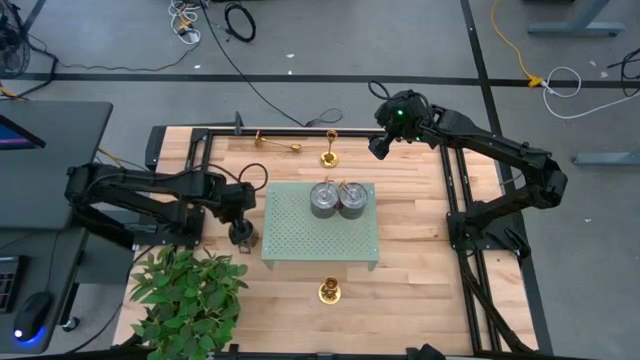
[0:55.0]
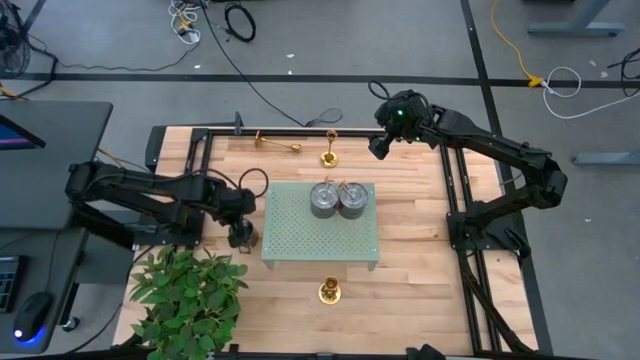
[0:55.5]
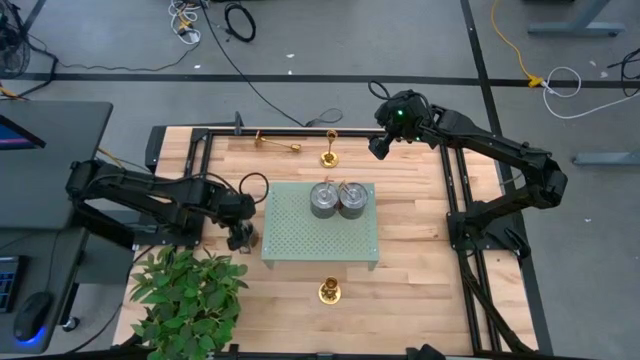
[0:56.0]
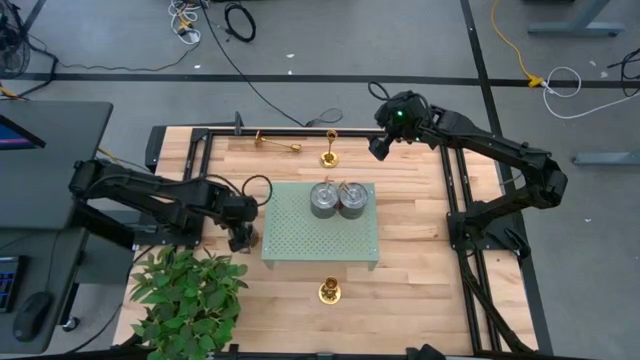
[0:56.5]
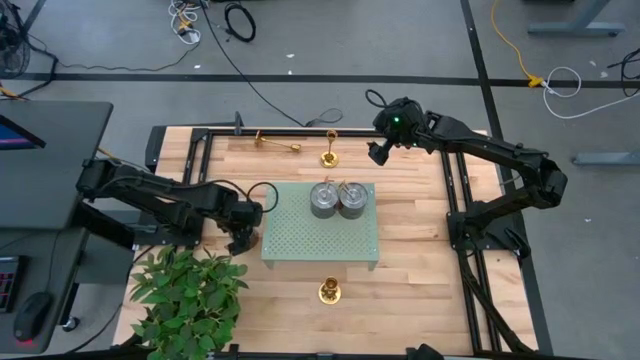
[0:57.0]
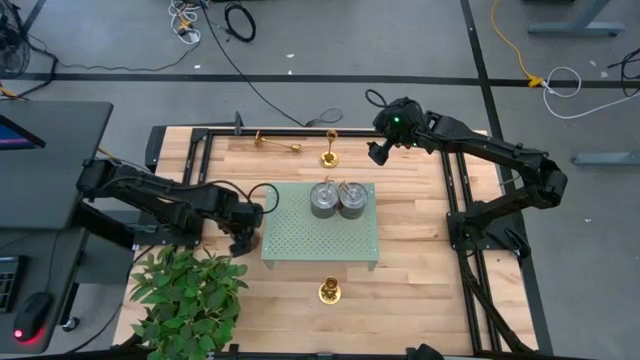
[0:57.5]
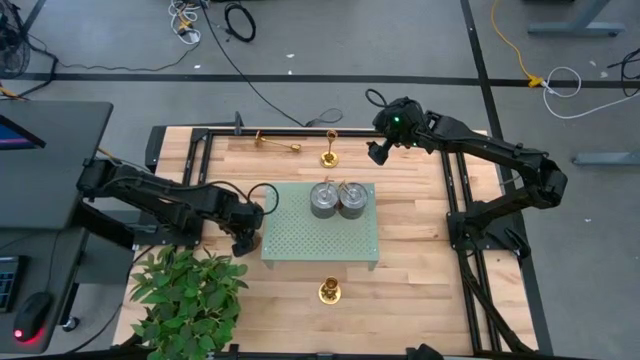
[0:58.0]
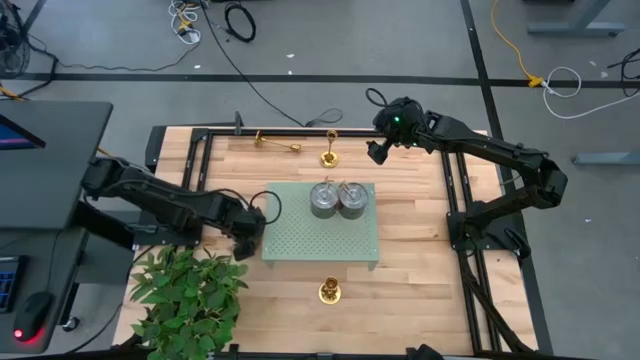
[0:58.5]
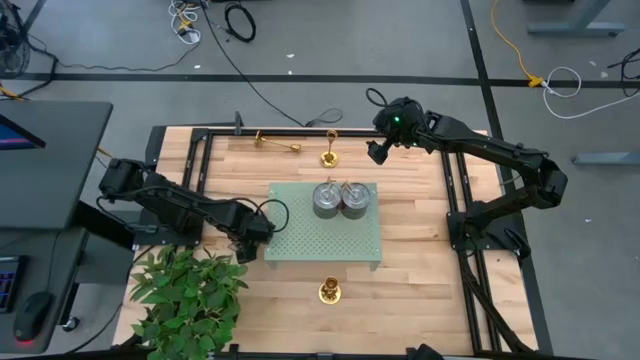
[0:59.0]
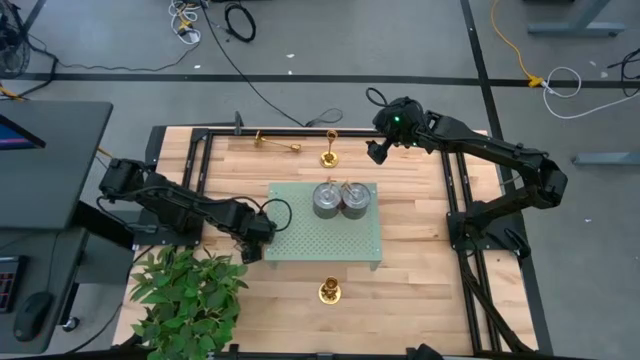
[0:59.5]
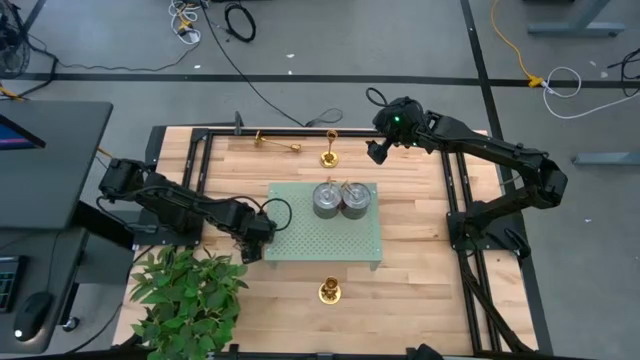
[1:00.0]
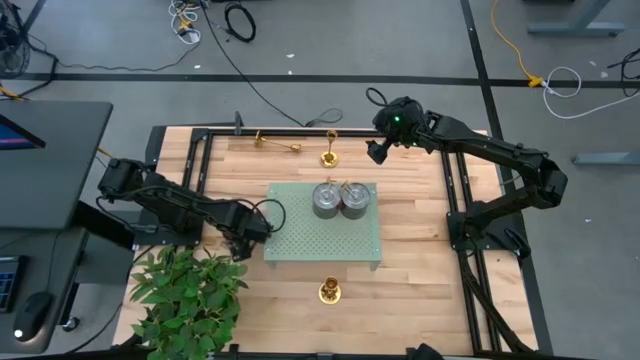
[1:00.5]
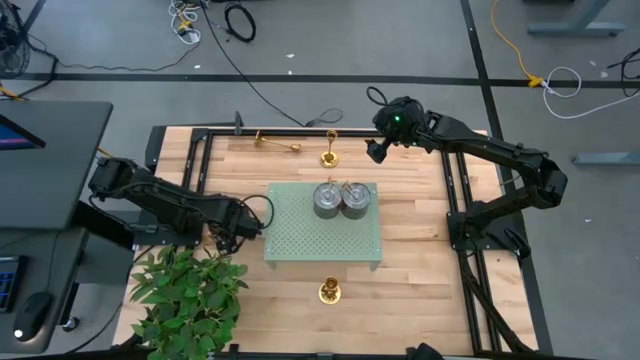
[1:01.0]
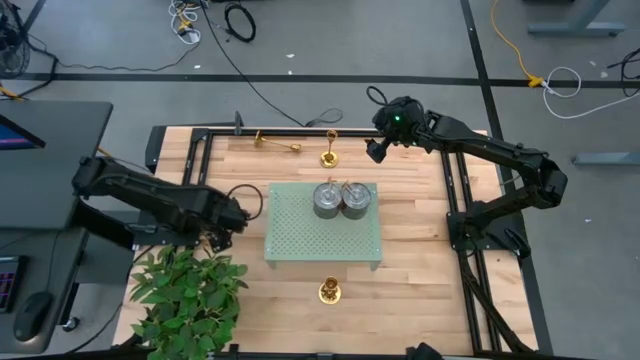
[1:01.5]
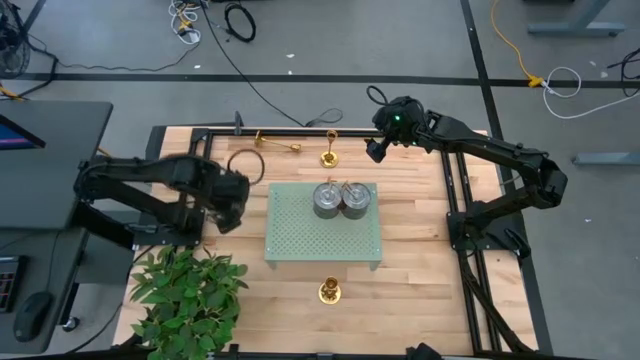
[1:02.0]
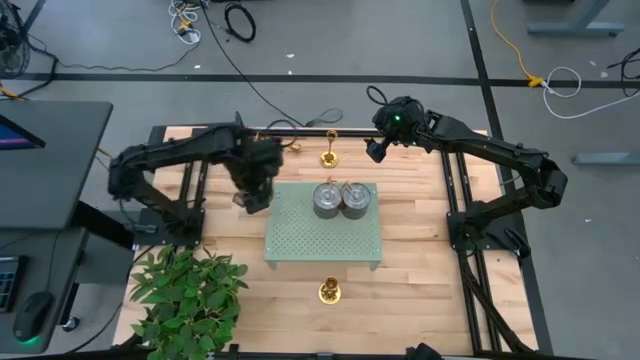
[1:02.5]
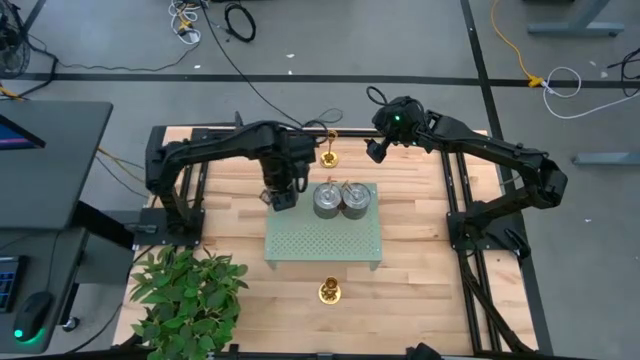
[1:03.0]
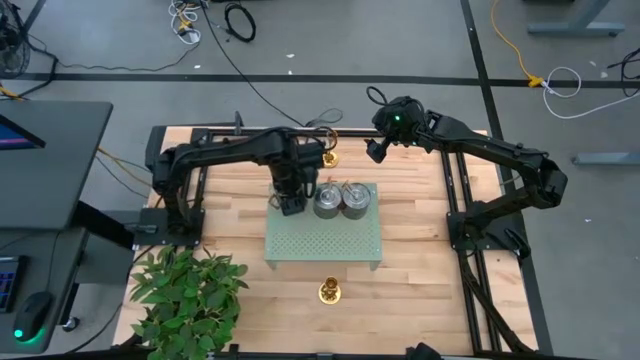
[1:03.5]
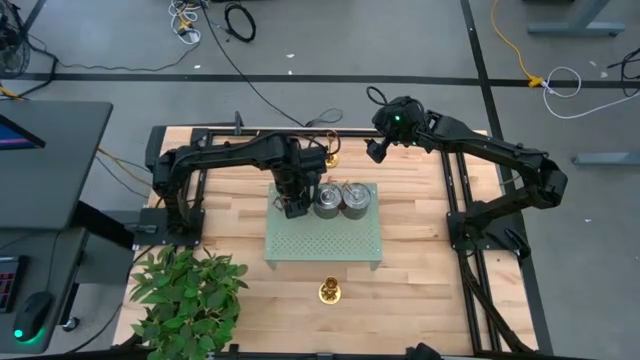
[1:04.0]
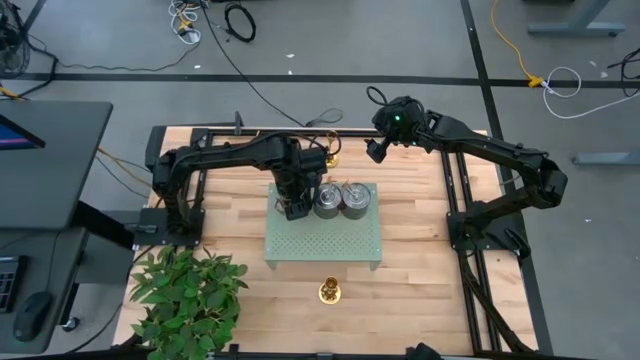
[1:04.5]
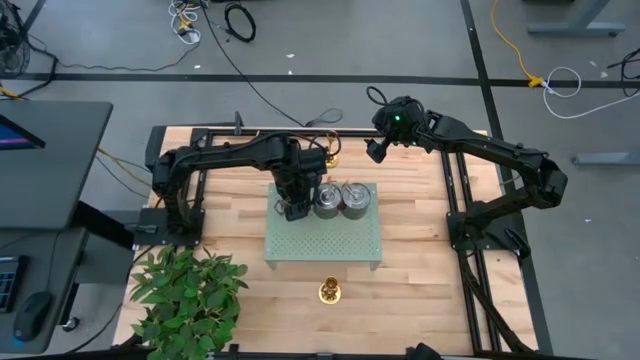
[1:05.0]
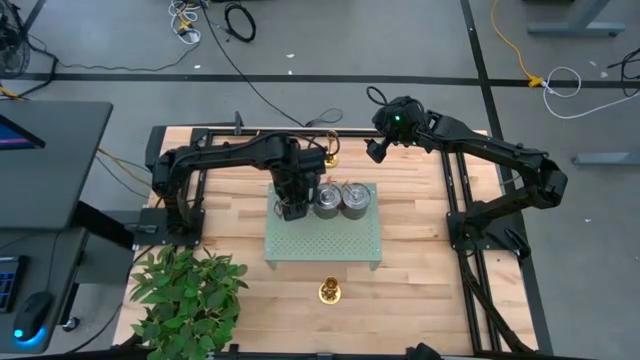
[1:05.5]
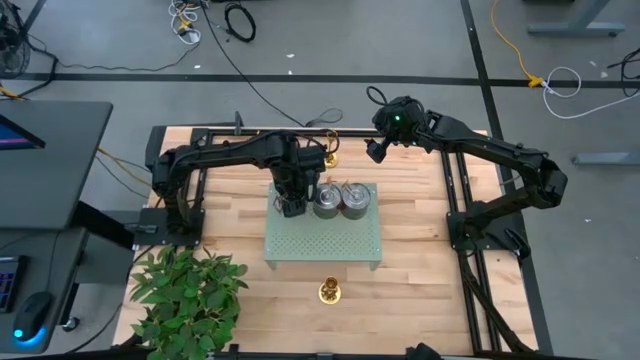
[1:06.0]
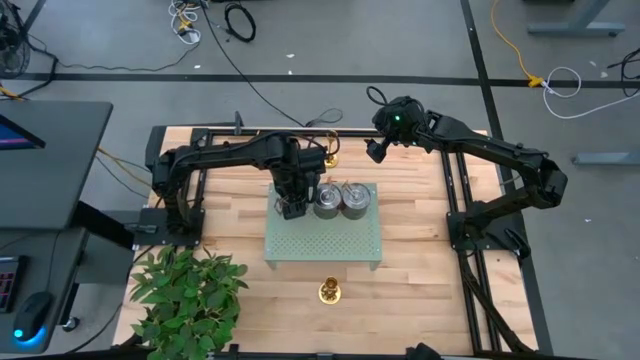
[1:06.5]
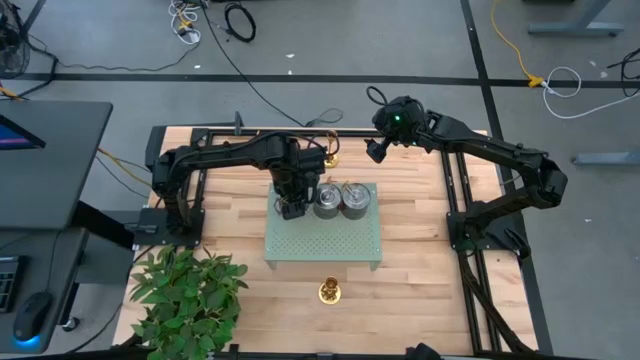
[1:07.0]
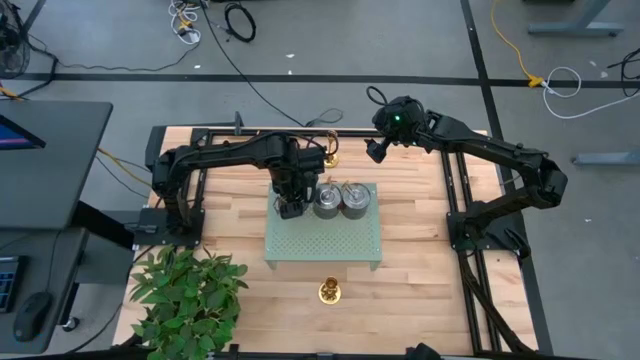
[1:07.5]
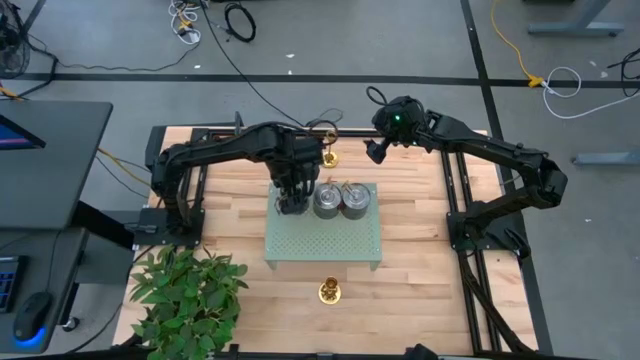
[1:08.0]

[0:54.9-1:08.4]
Task: Pick & Place candle stick holders
Put the orange scented candle on the shelf

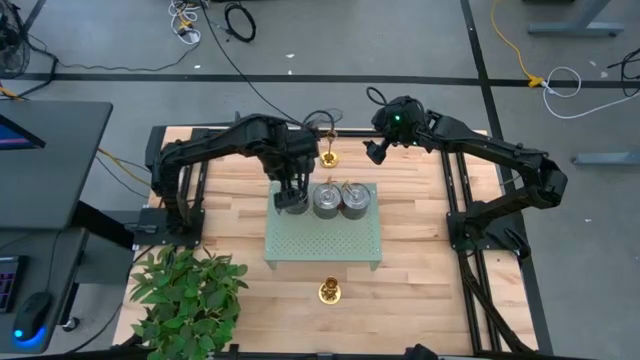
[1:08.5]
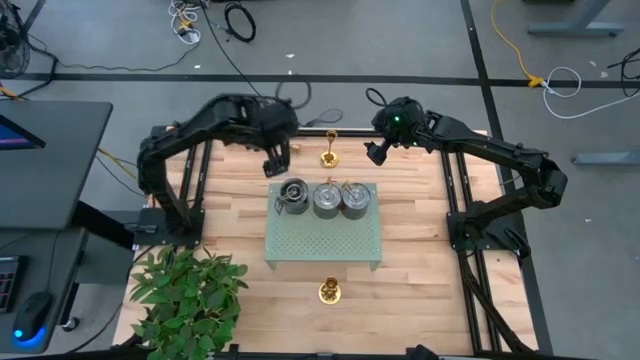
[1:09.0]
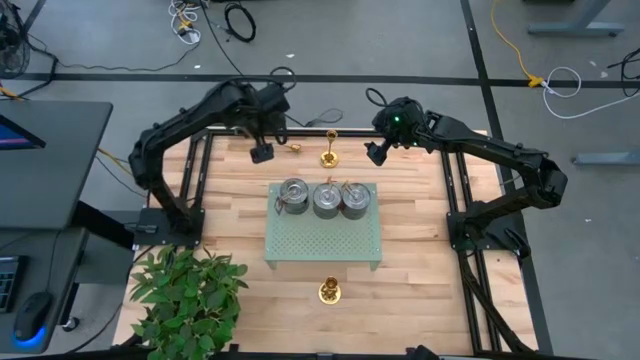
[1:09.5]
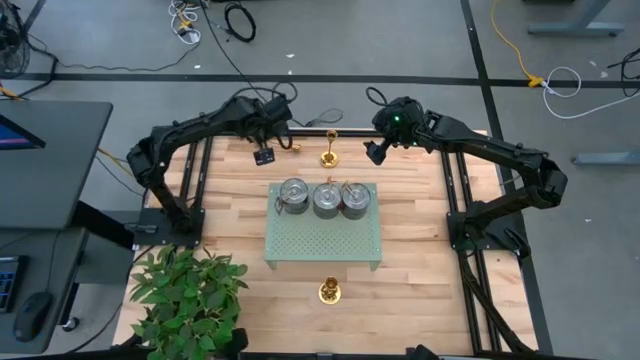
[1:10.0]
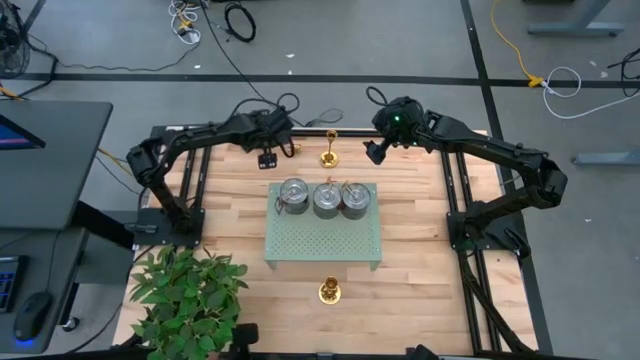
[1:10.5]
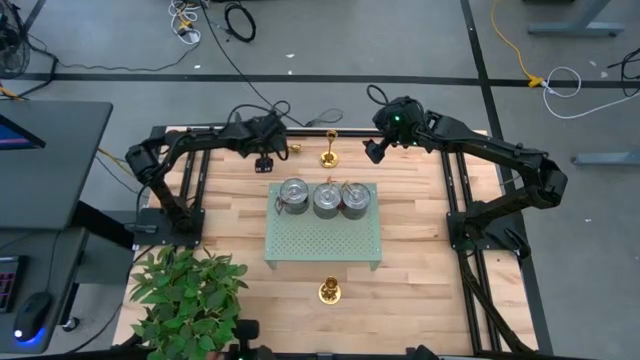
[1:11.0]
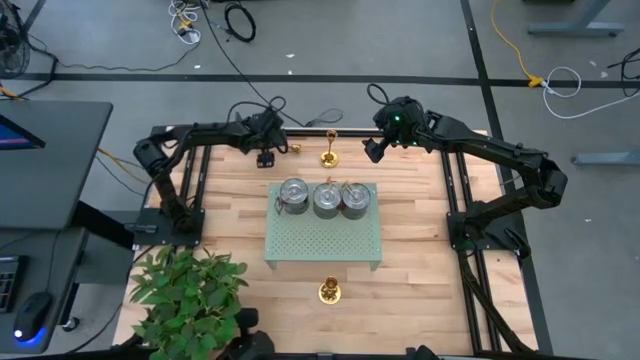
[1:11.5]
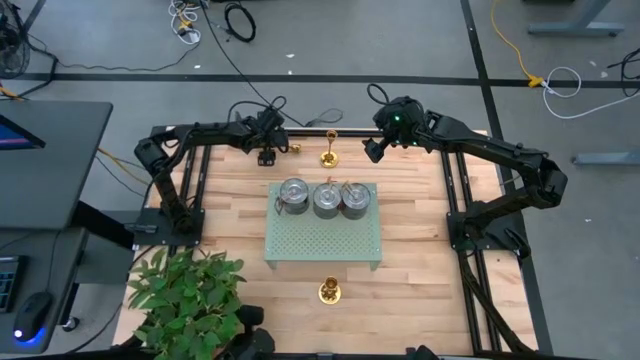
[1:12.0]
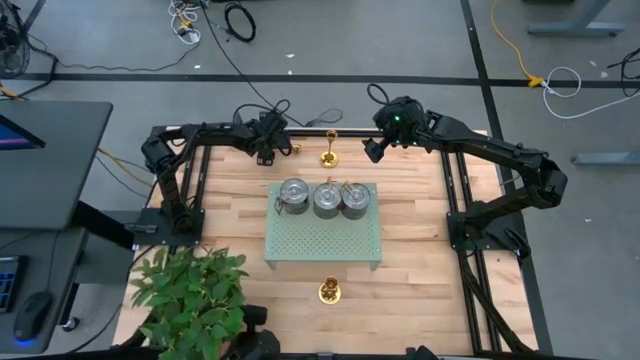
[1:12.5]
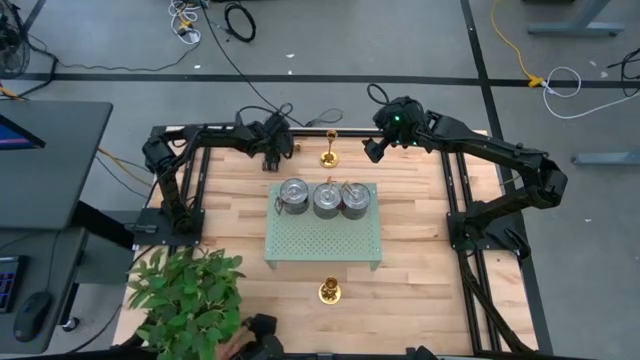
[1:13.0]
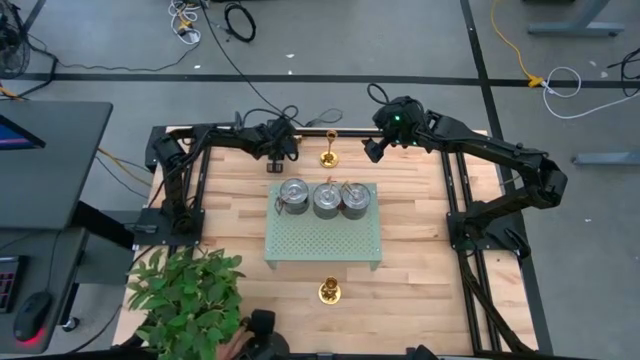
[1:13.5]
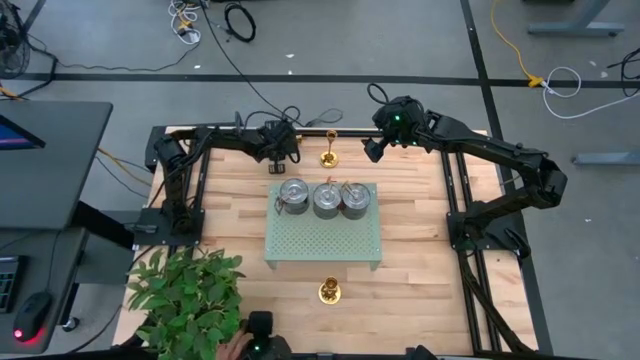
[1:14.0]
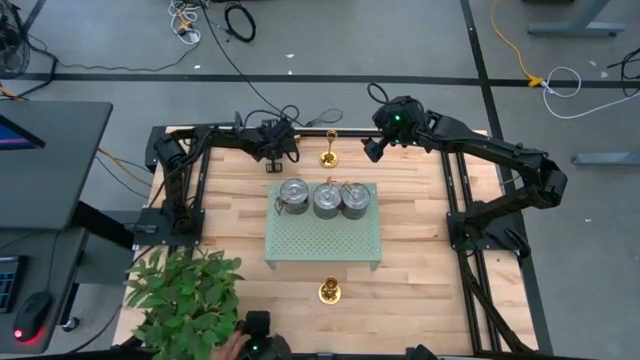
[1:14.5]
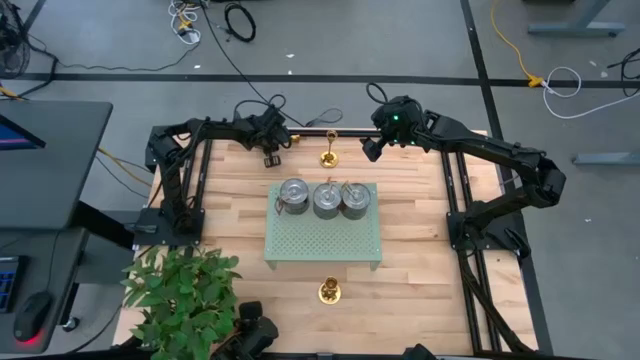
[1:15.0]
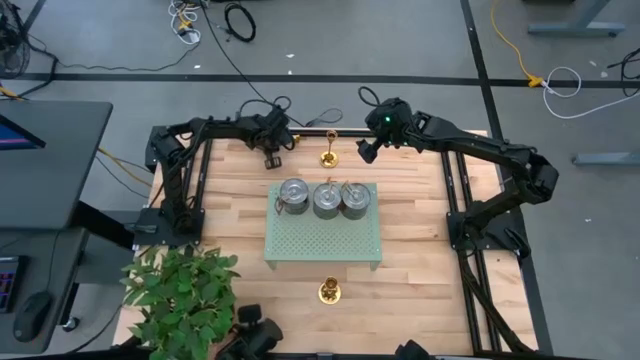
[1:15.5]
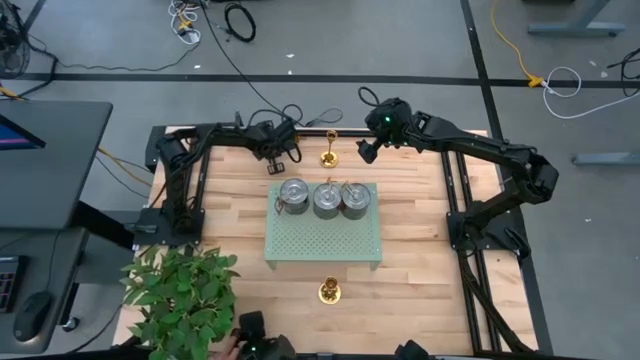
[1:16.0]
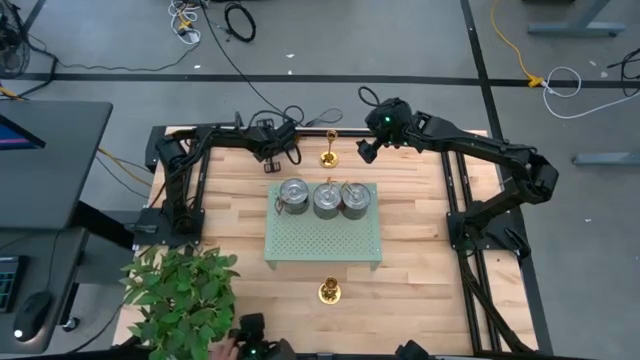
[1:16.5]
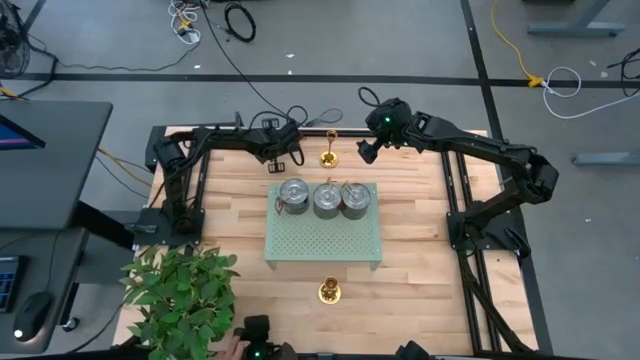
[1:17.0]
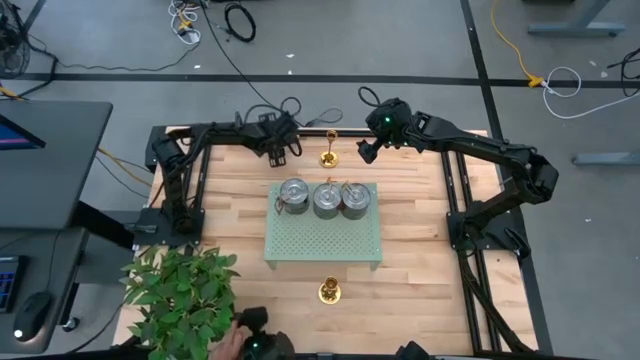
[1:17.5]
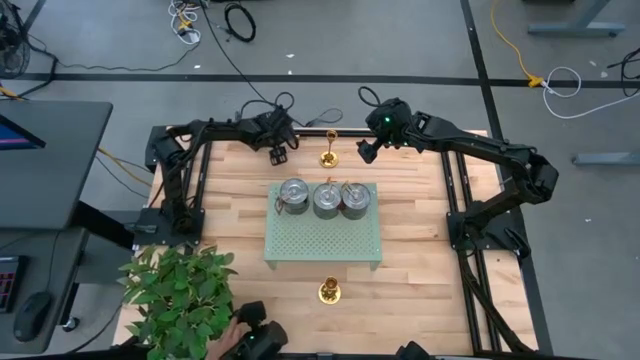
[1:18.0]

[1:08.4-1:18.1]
Put the top golden candle holder on the shelf aligned with the middle orange scented candle
